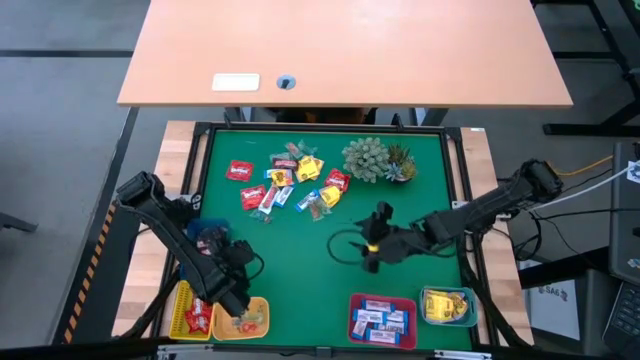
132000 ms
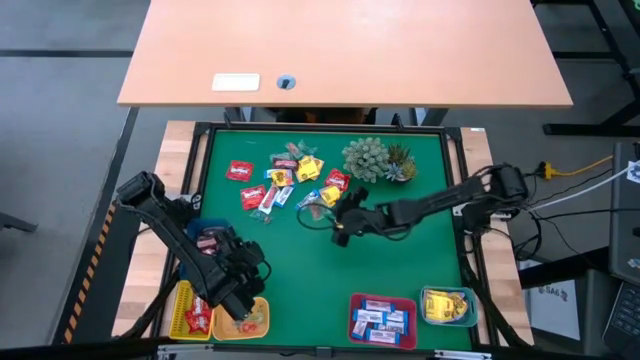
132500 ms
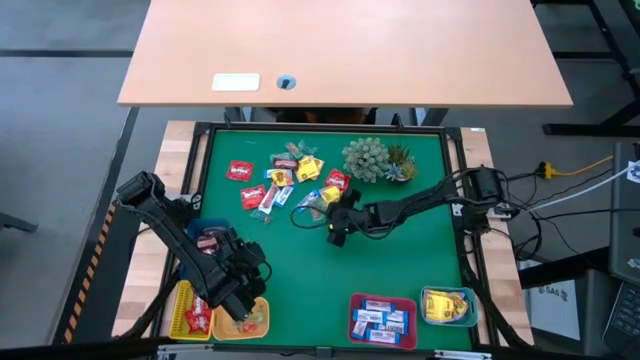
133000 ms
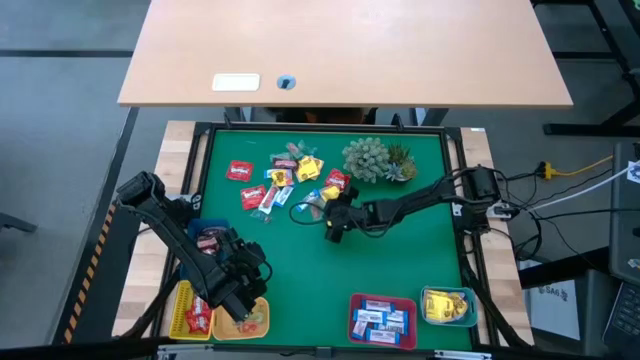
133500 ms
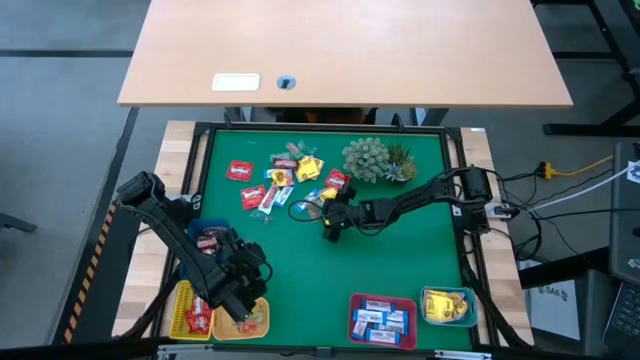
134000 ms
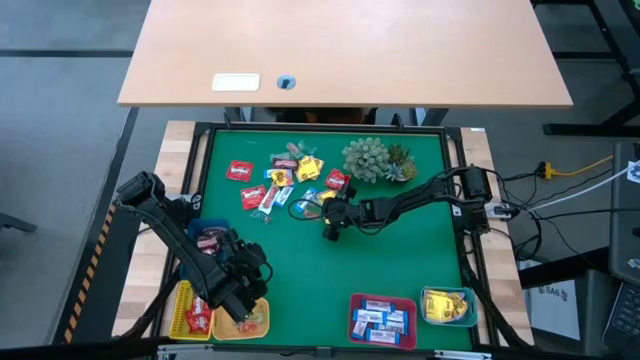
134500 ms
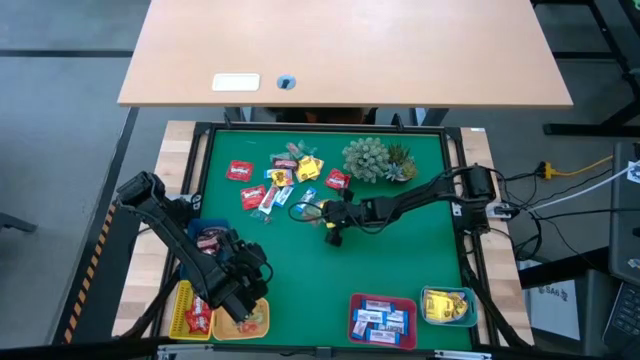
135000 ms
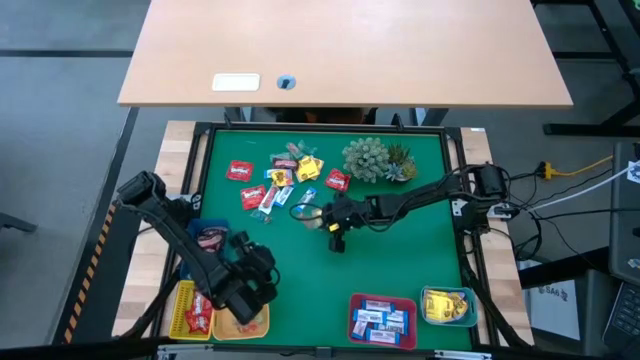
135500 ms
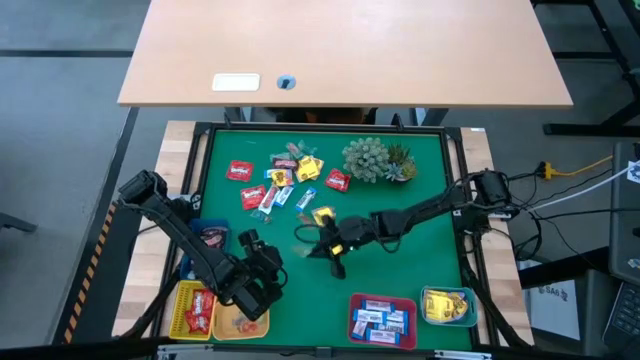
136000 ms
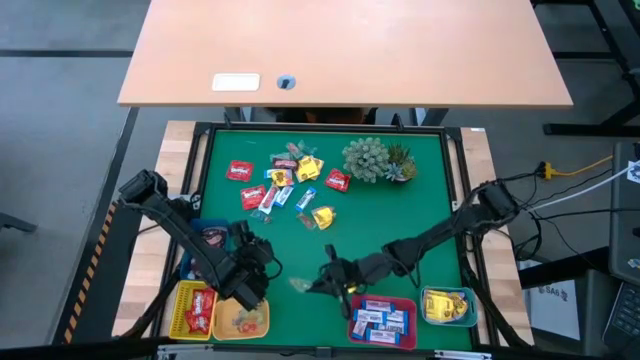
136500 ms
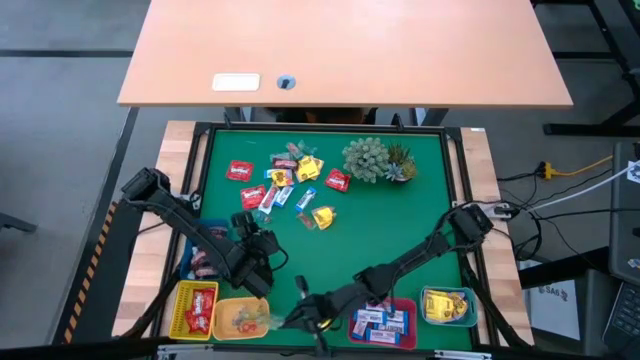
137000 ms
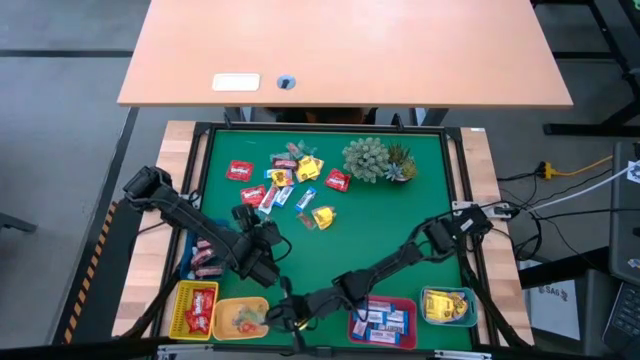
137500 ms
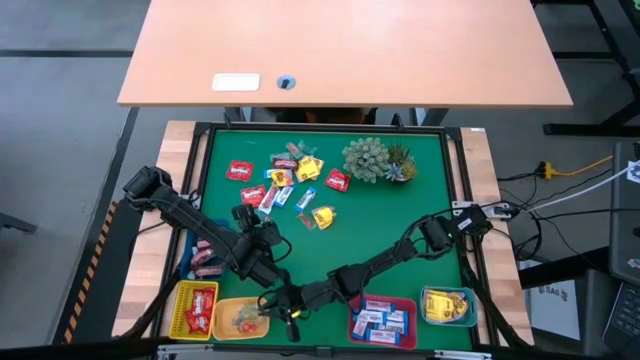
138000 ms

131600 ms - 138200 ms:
Task: Sort candy
Put the transparent candy into the orange bin

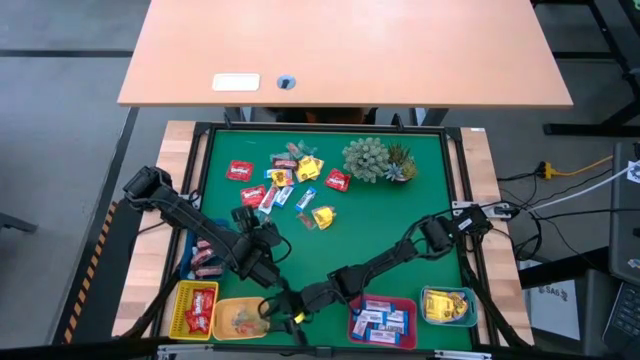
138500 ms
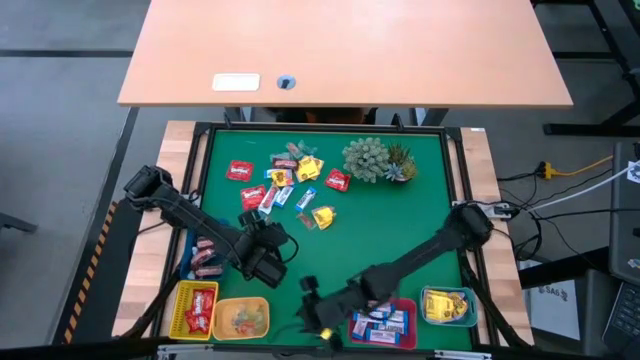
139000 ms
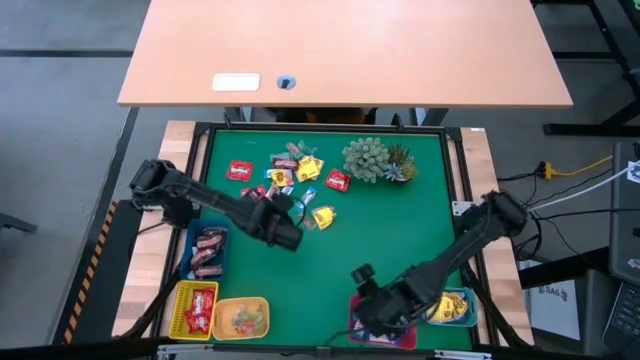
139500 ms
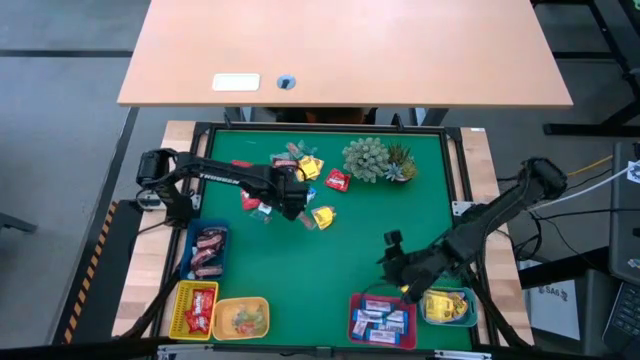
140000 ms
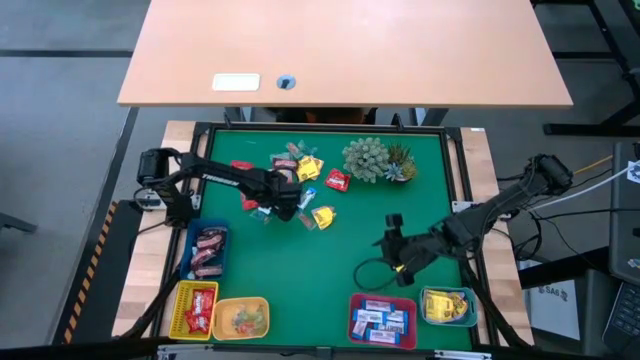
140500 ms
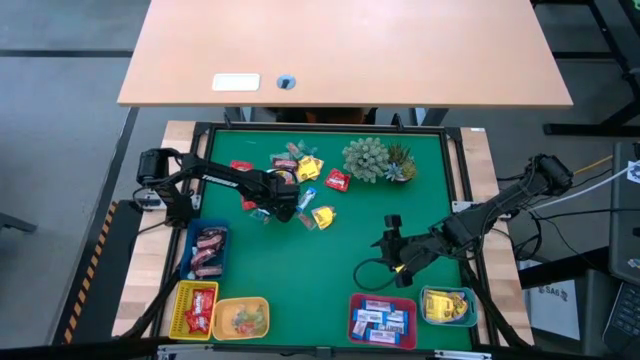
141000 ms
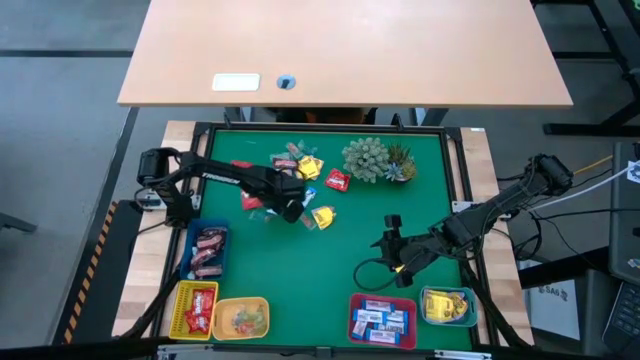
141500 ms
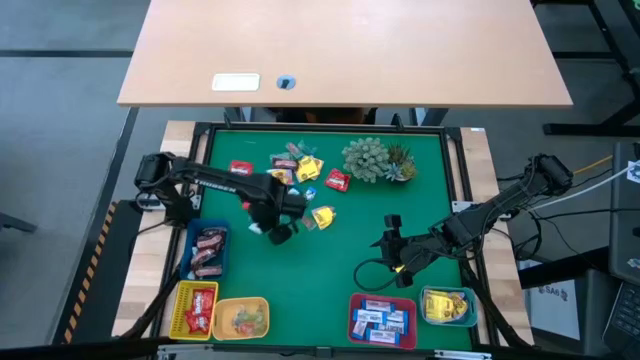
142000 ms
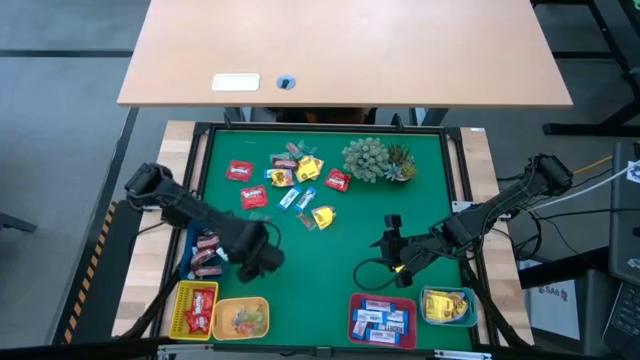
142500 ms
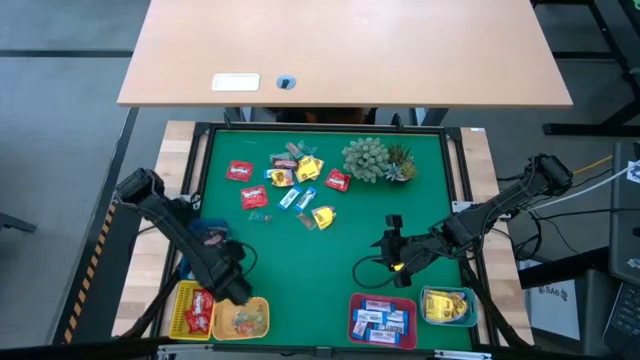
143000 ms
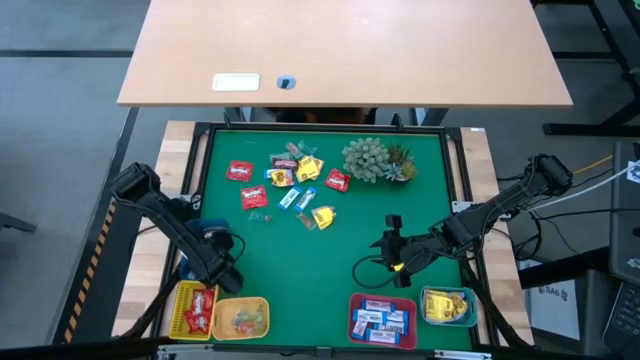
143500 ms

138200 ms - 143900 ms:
Put the white chocolate into the blue bin

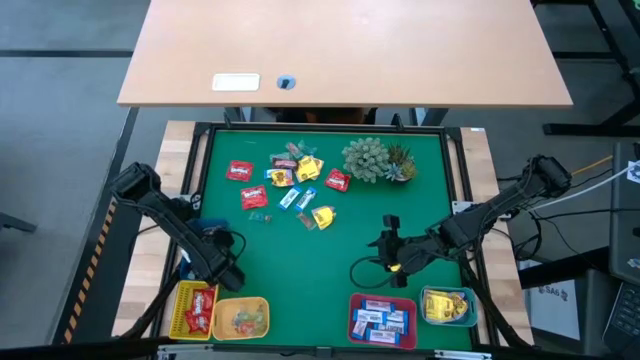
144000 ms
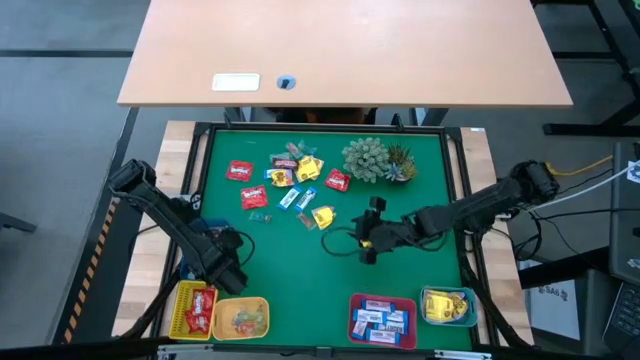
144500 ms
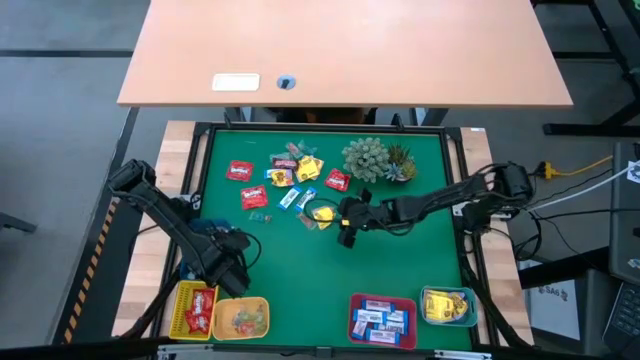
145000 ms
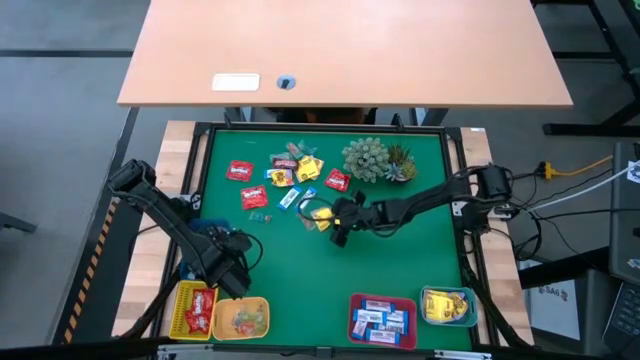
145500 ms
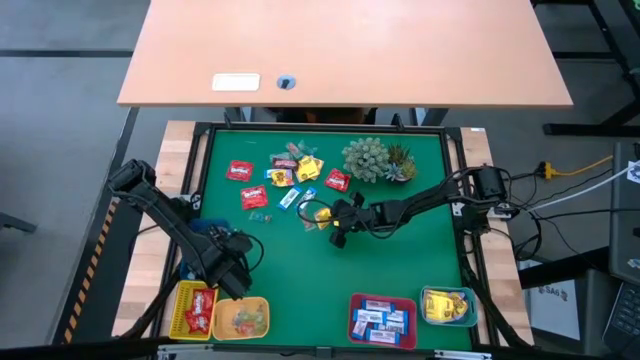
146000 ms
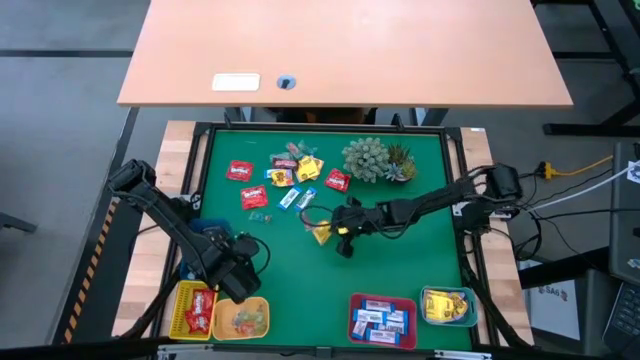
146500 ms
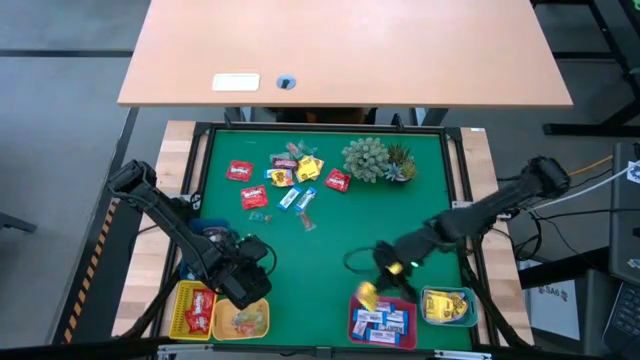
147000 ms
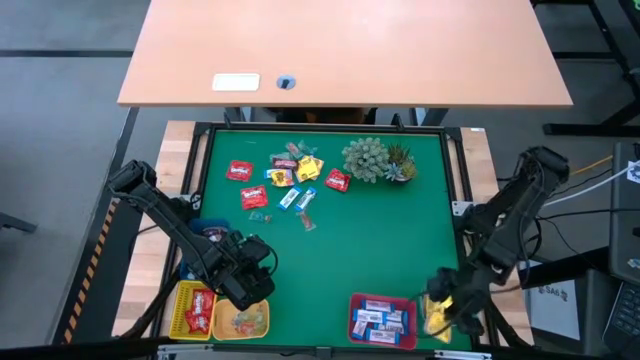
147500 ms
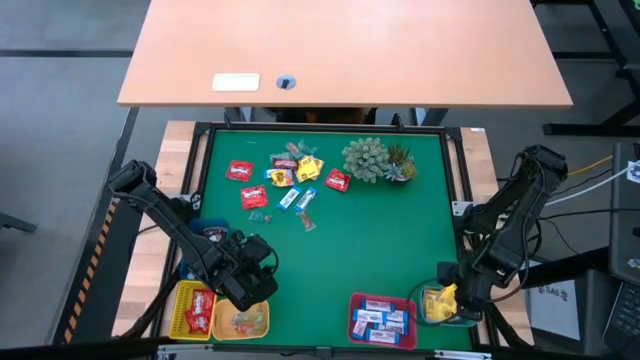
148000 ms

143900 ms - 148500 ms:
Put the yellow candy into the green bin

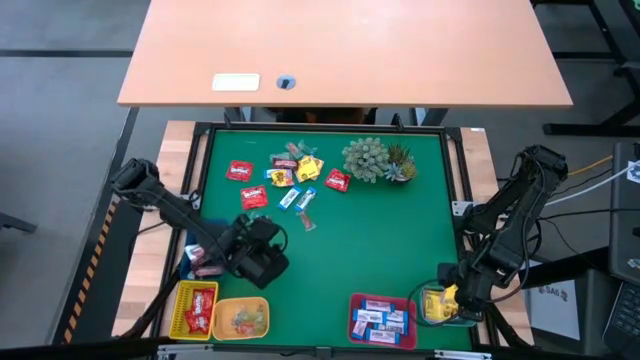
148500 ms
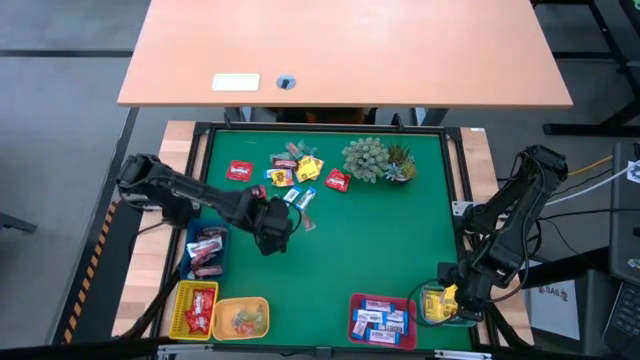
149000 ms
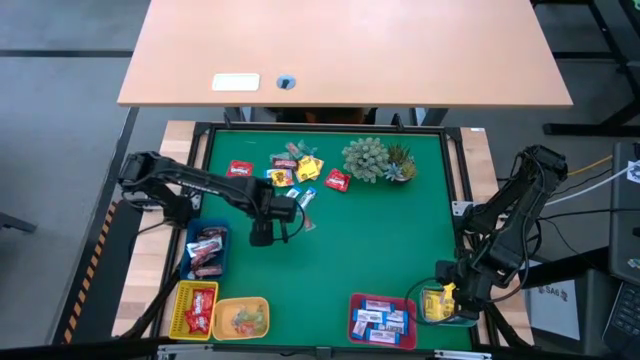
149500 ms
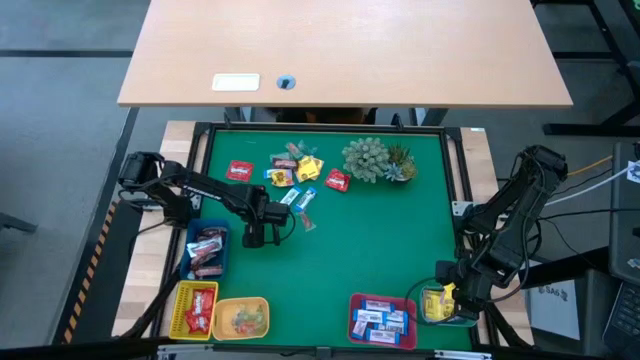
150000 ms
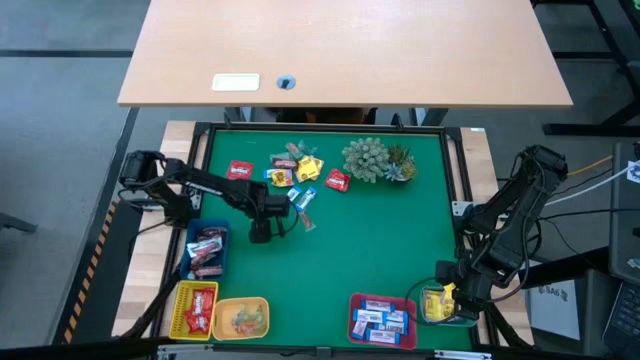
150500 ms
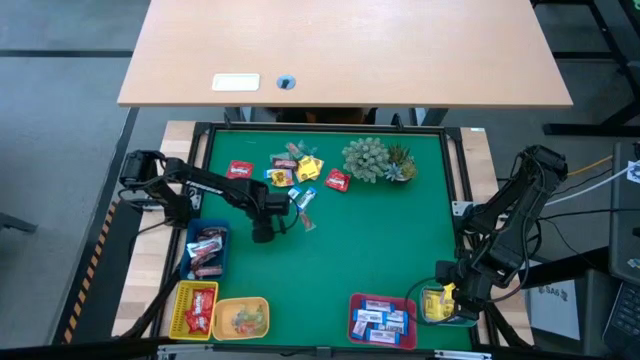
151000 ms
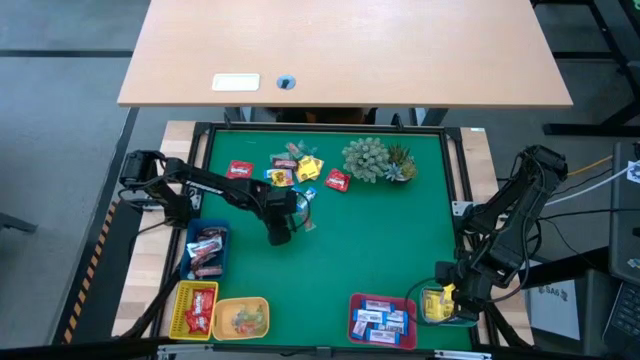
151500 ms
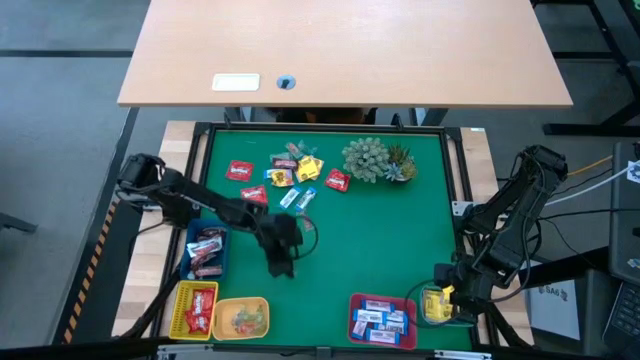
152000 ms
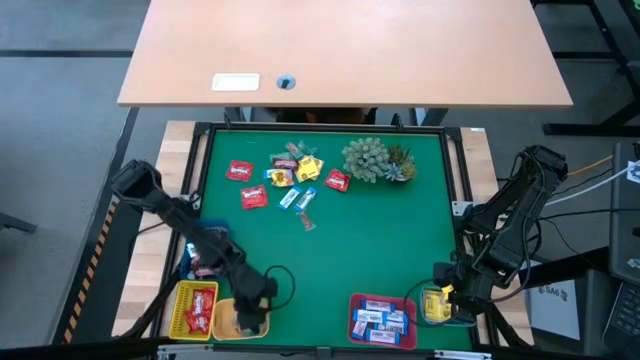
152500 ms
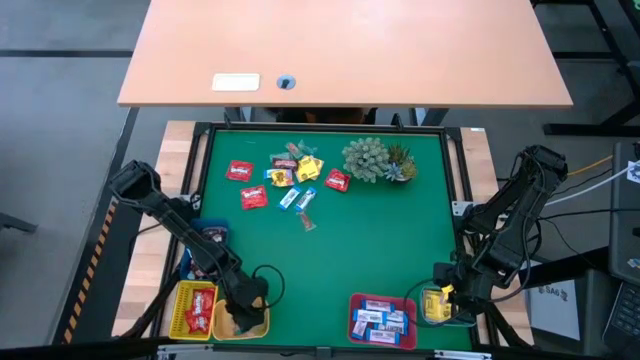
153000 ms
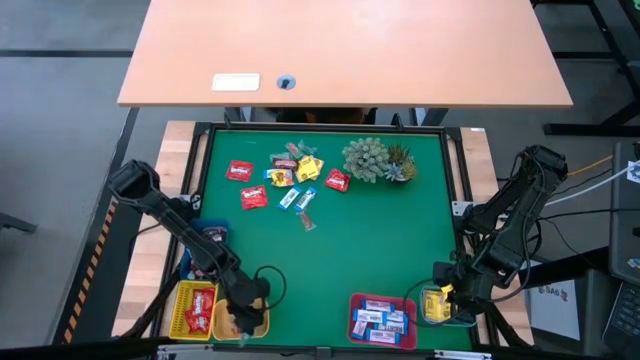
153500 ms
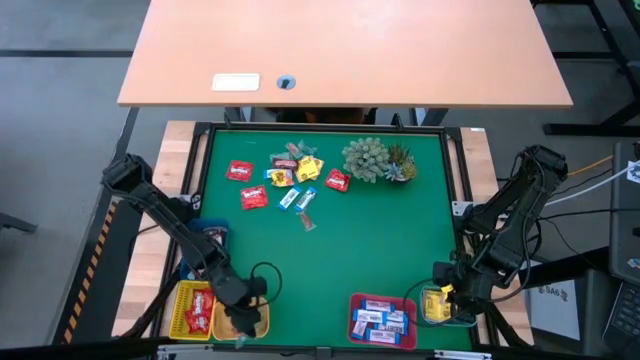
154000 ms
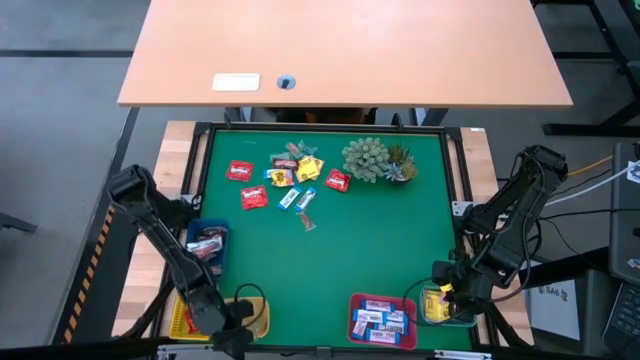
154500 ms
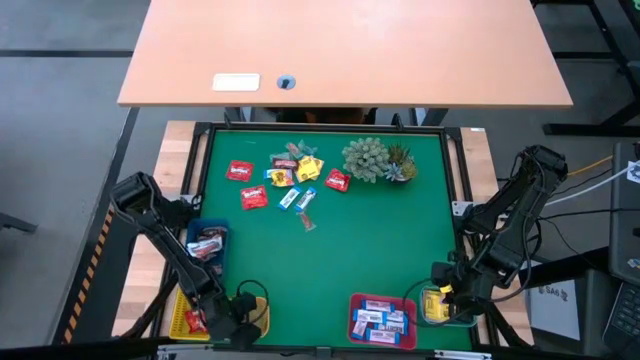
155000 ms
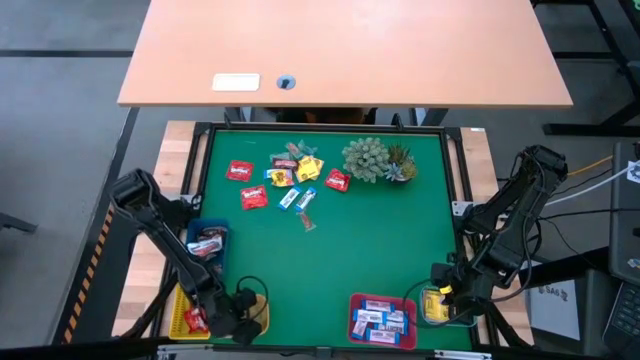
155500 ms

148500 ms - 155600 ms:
Put the transparent candy into the orange bin
